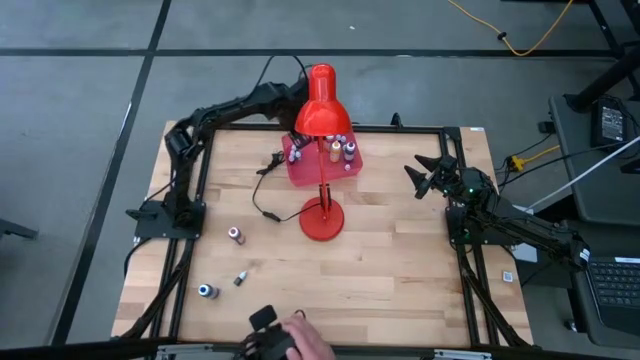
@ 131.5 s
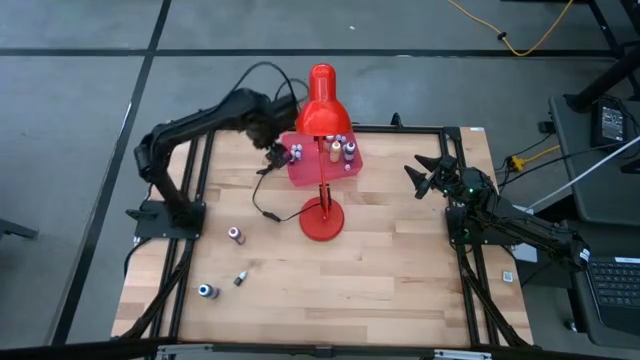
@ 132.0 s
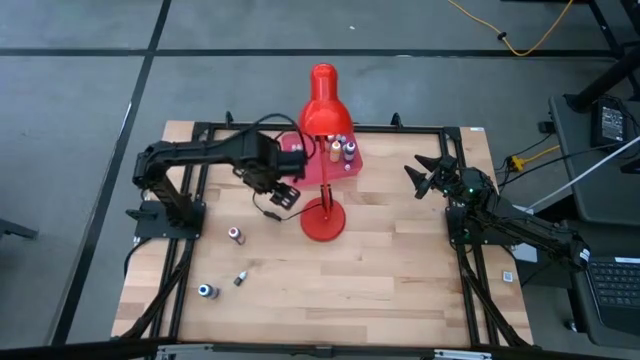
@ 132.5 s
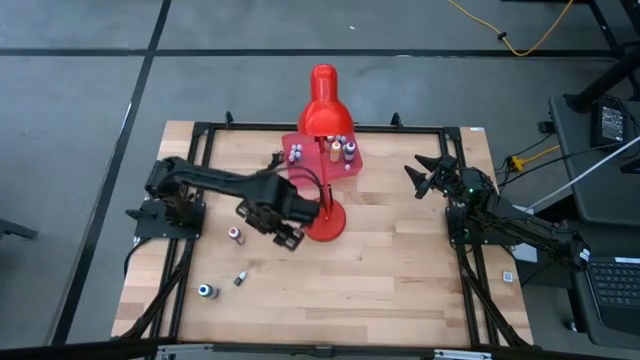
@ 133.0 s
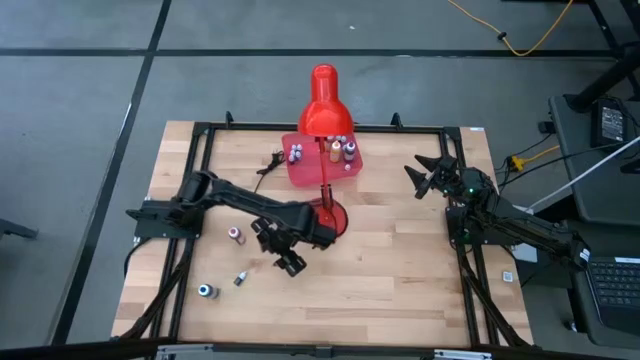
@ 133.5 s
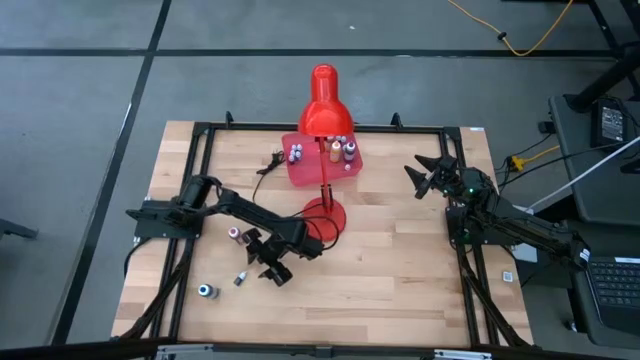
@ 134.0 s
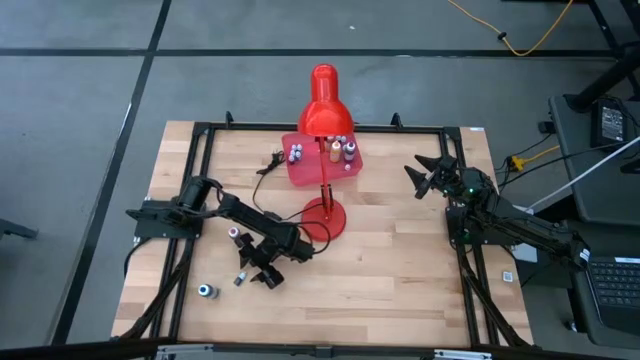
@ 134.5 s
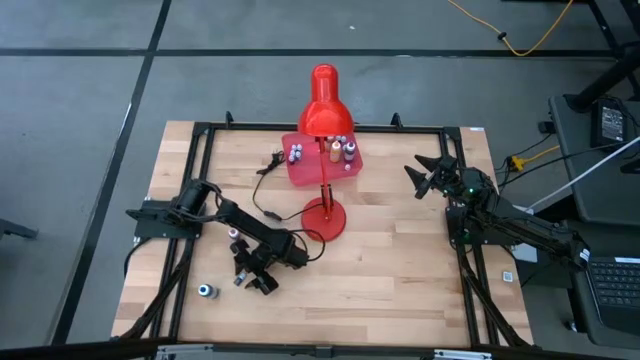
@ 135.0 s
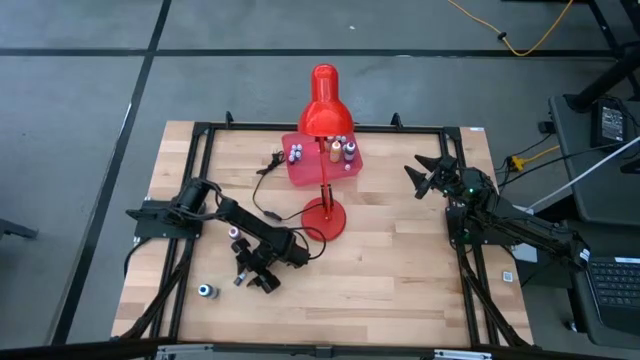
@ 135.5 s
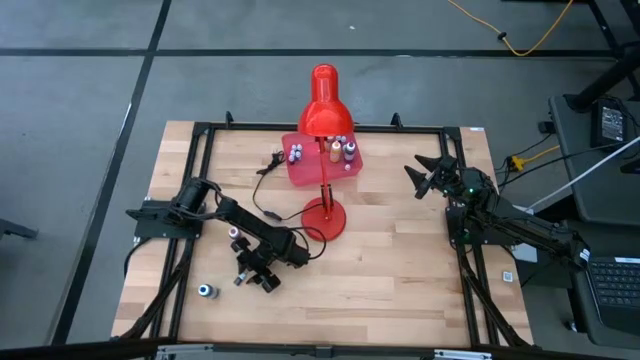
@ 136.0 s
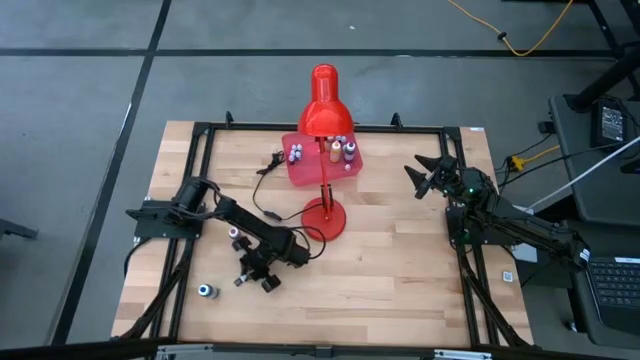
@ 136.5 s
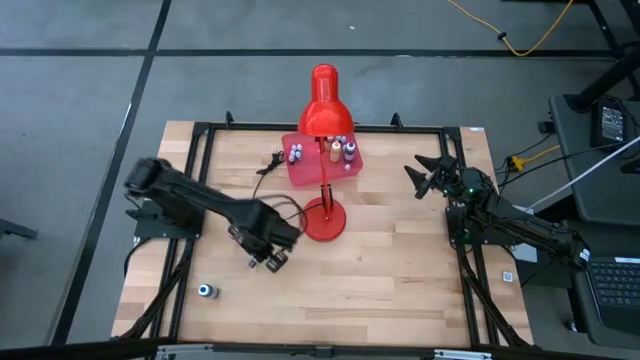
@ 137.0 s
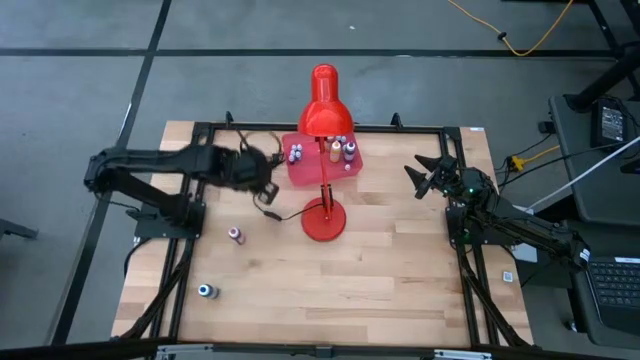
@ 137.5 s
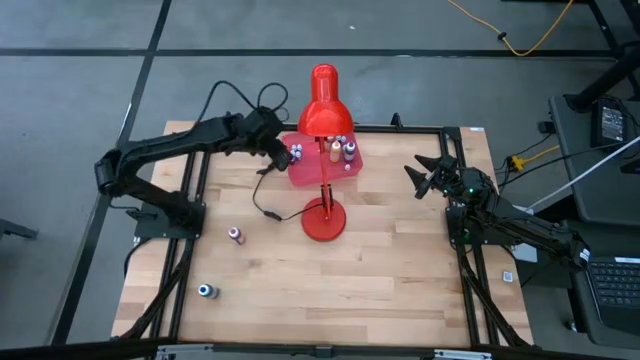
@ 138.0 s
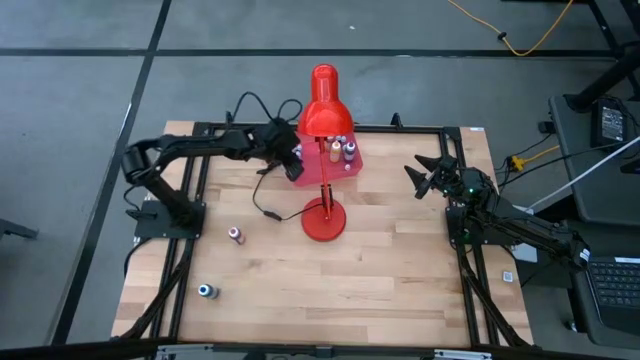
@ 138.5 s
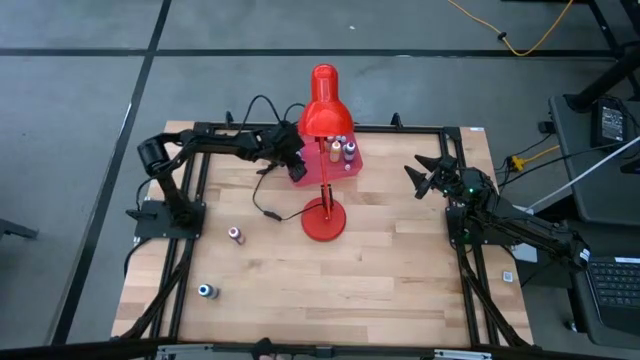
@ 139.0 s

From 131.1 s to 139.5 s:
Task: Pick & Place food coloring
Put the small purple food coloring bottle into the red bin

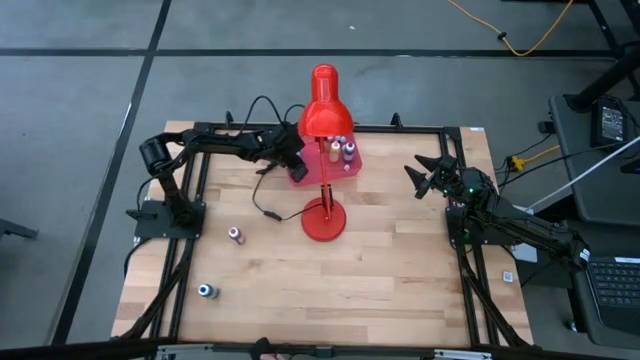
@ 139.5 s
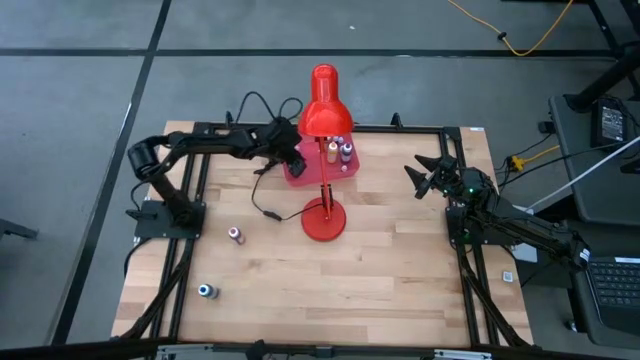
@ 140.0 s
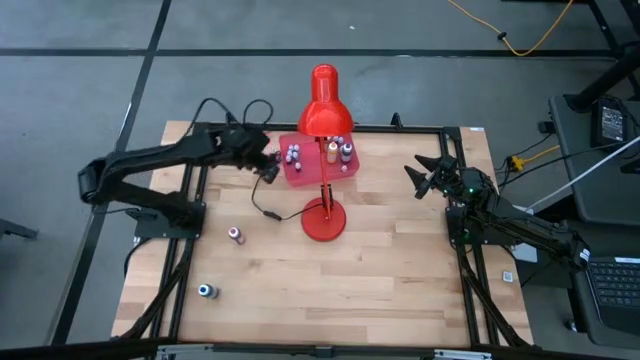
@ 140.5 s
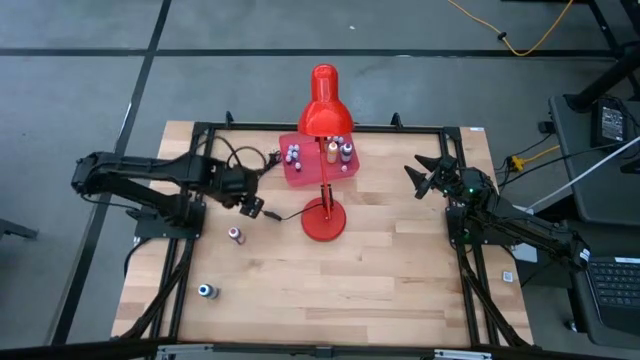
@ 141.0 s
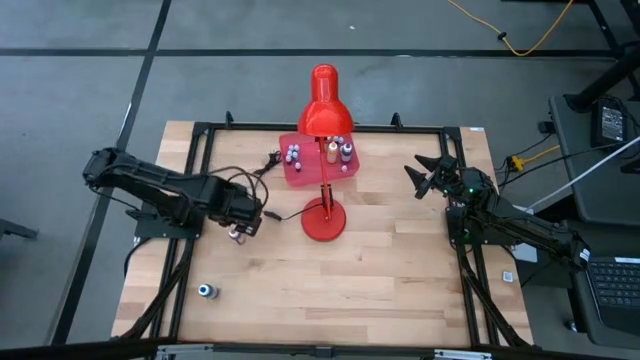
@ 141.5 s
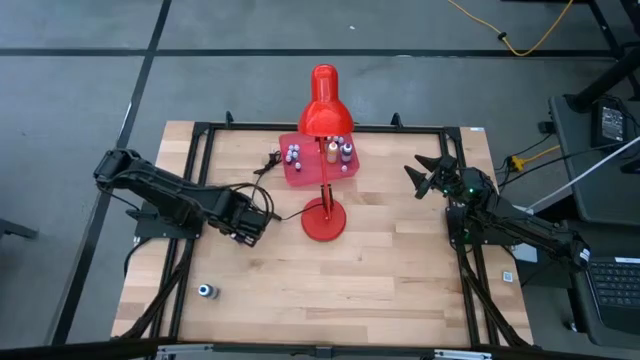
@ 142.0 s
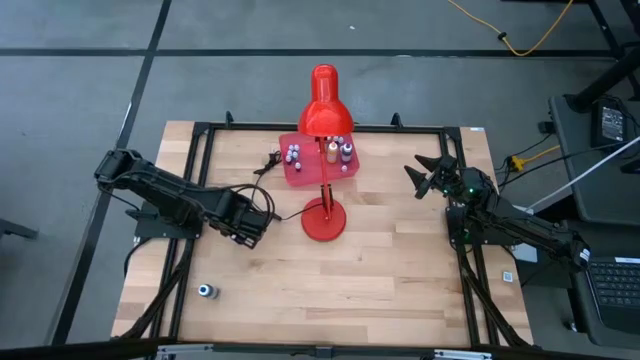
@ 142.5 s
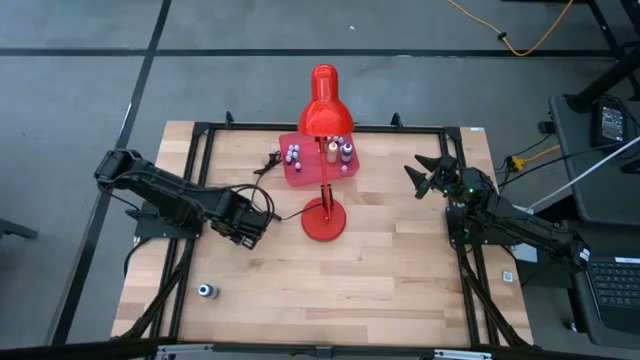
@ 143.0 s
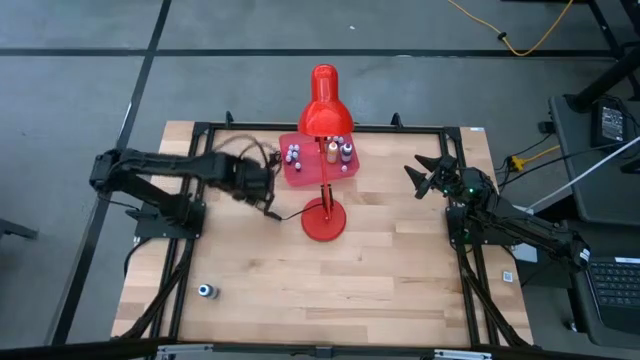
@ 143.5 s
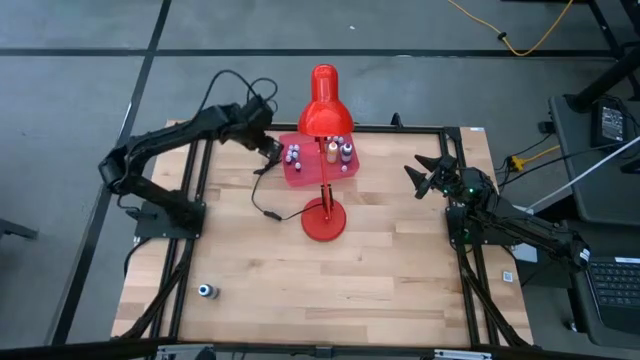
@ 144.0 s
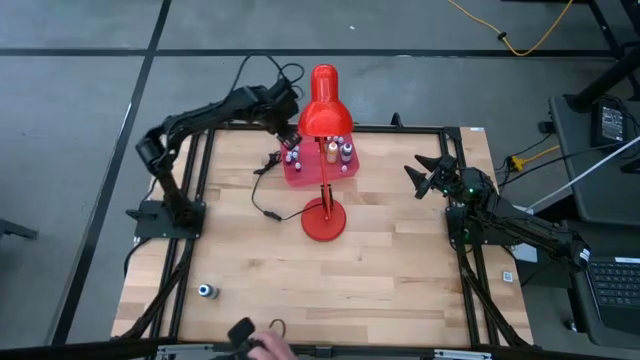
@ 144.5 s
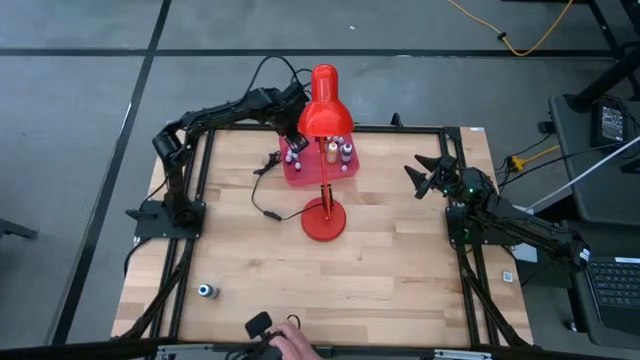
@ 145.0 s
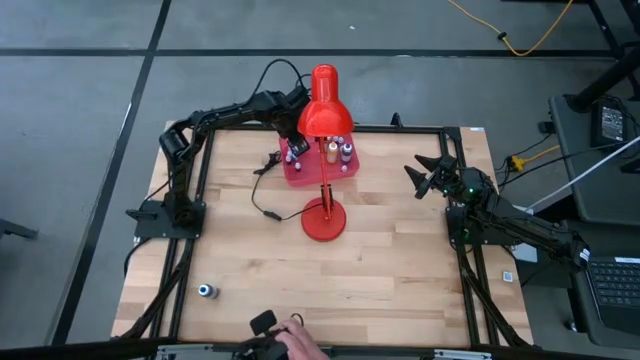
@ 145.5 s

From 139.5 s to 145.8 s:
Put the large pink food coloring bottle into the red bin

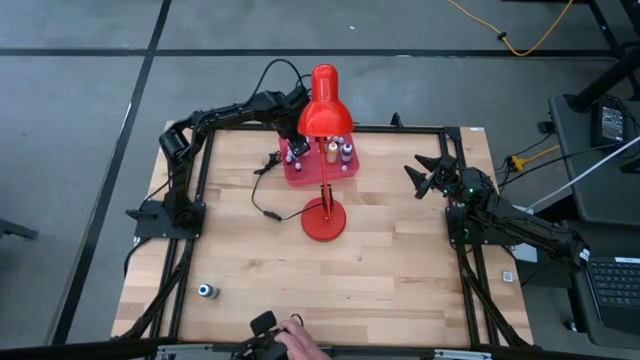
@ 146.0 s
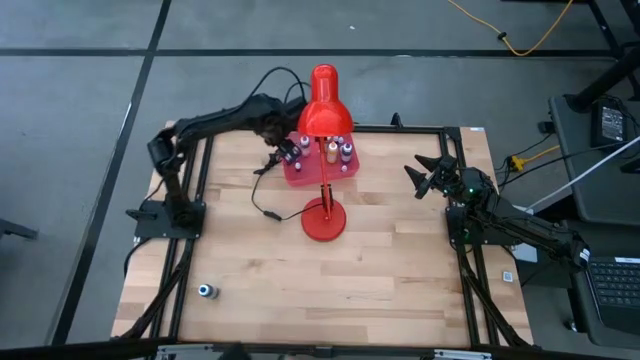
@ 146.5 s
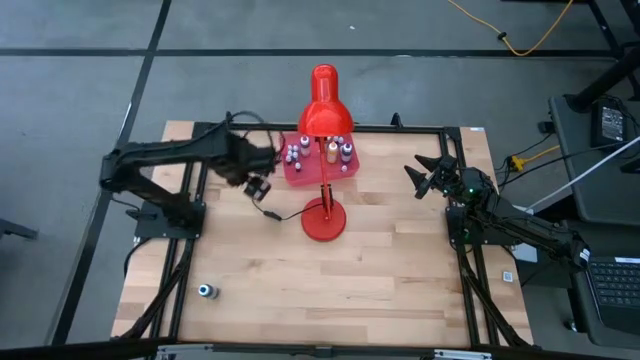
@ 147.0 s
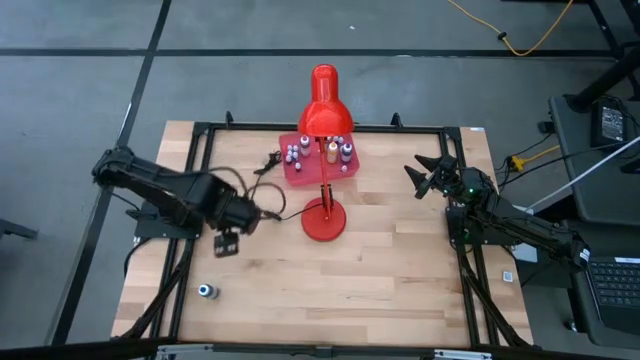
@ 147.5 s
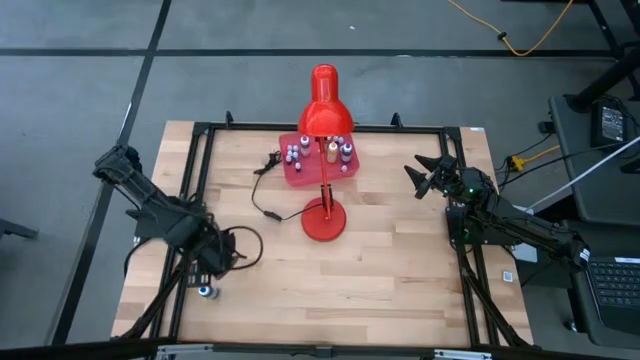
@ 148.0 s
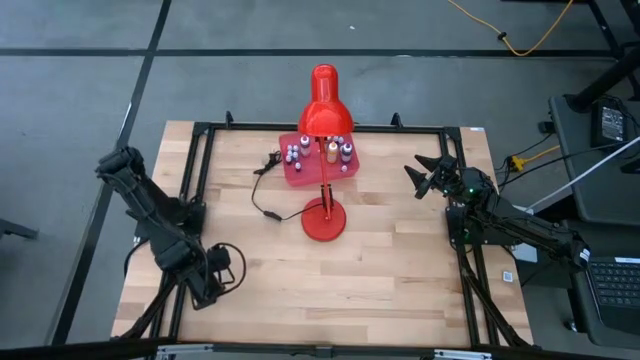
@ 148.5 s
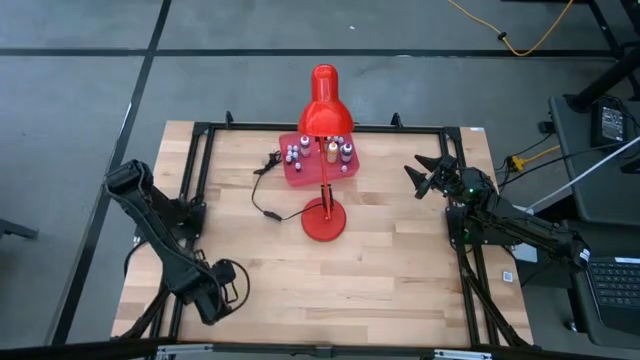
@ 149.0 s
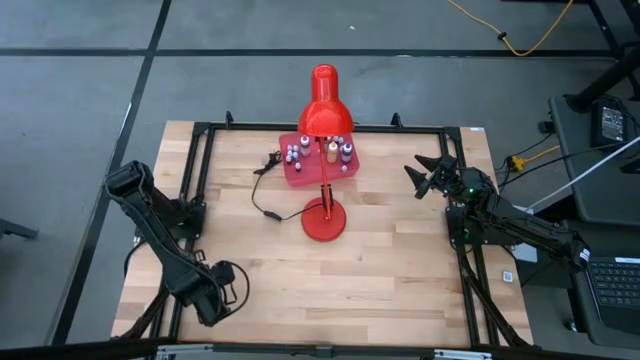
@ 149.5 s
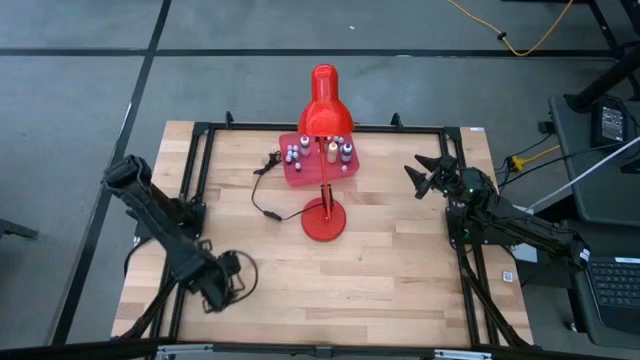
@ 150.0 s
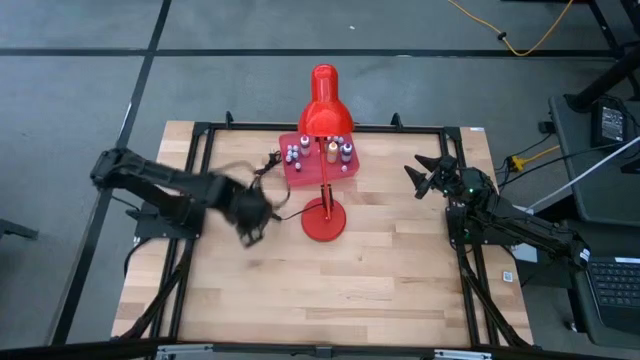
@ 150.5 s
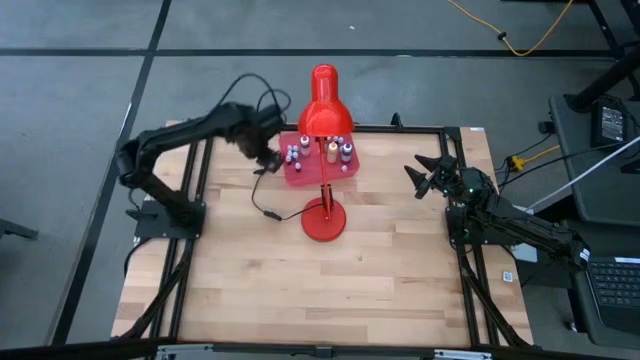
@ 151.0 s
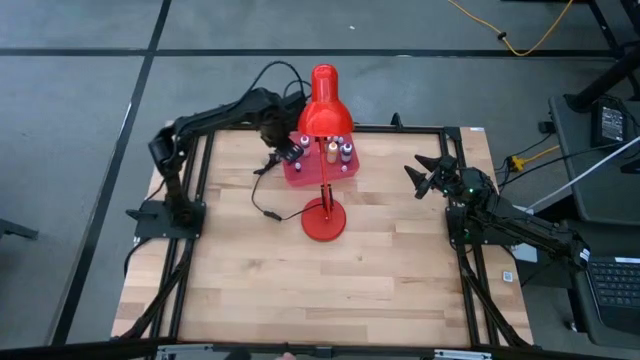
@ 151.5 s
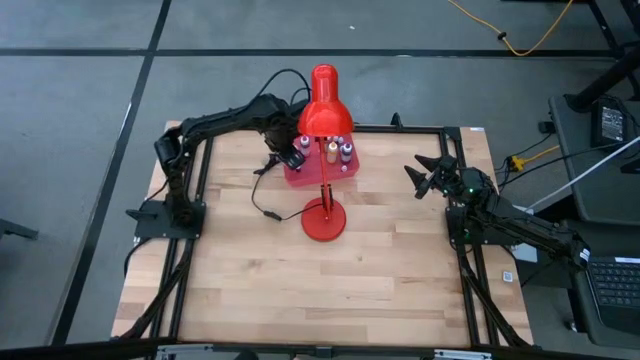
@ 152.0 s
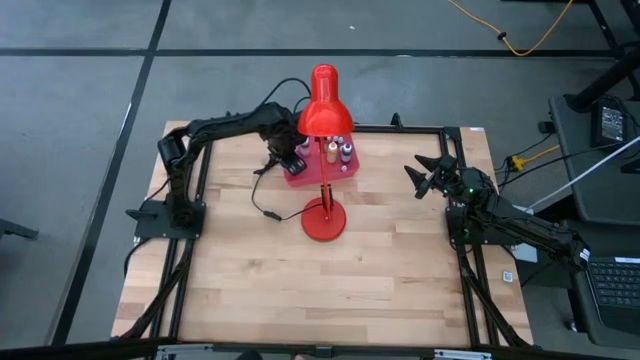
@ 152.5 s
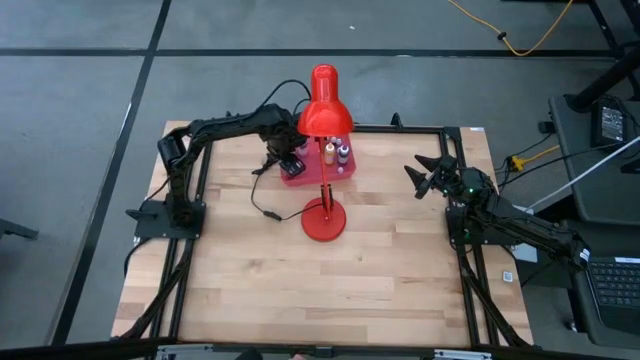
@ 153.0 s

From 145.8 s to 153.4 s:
Put the large blue food coloring bottle into the red bin
